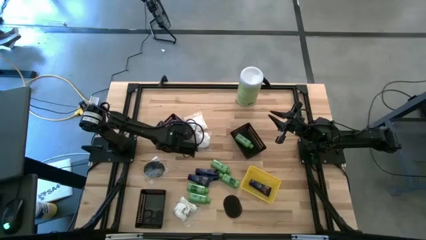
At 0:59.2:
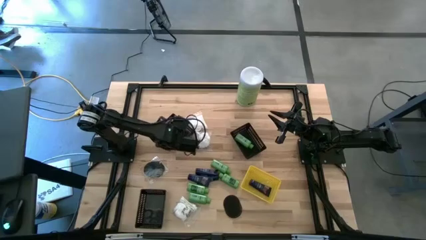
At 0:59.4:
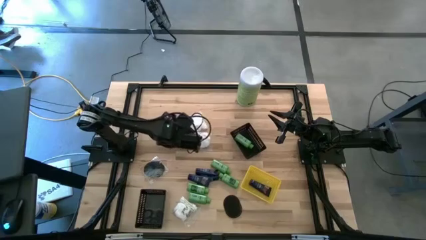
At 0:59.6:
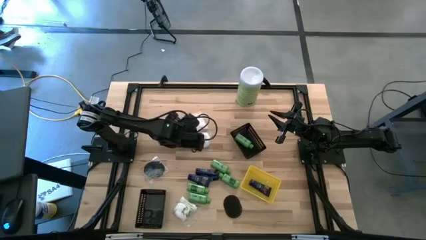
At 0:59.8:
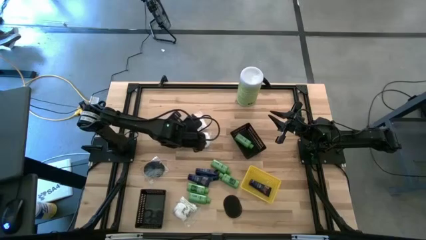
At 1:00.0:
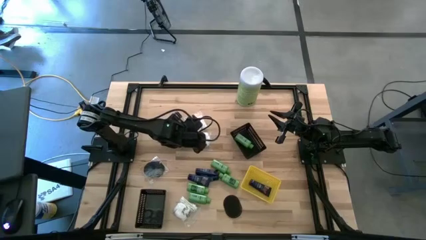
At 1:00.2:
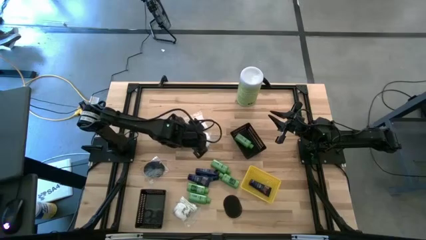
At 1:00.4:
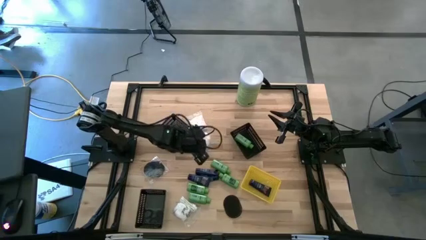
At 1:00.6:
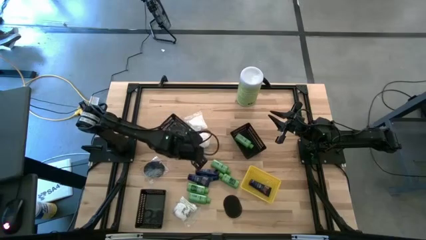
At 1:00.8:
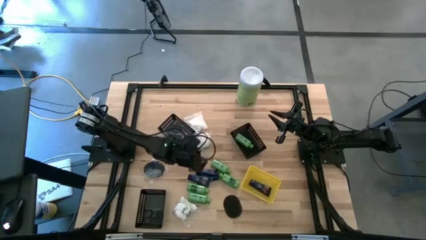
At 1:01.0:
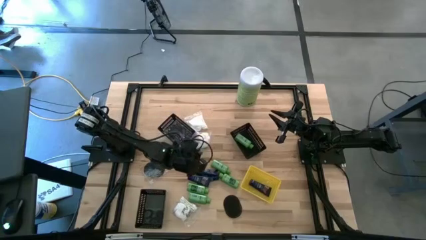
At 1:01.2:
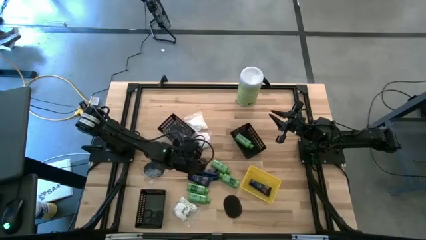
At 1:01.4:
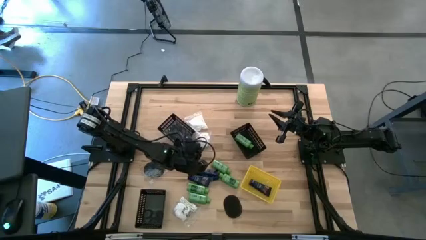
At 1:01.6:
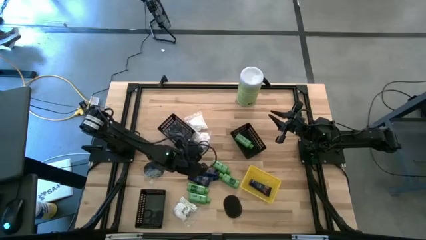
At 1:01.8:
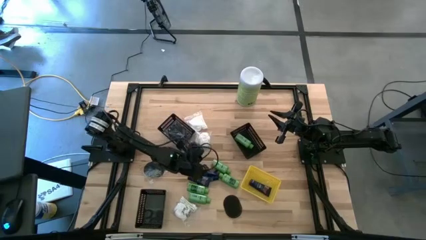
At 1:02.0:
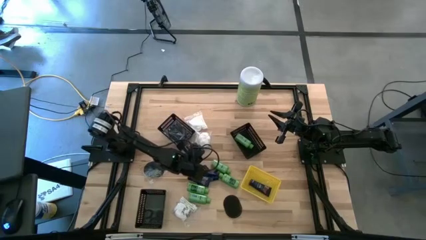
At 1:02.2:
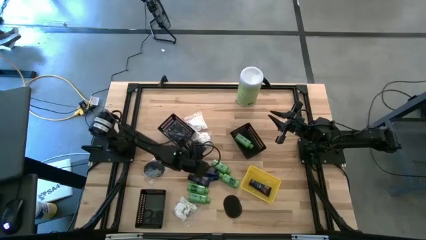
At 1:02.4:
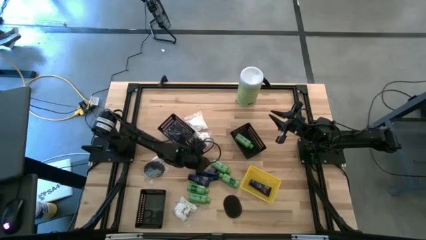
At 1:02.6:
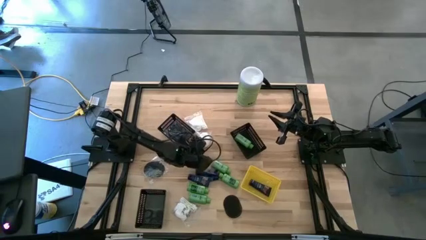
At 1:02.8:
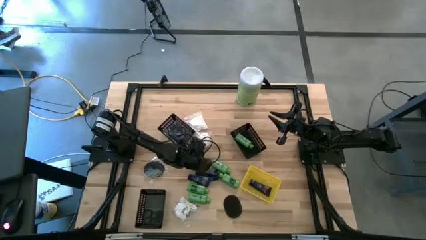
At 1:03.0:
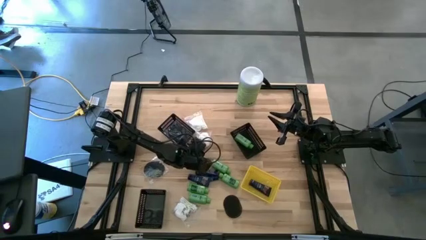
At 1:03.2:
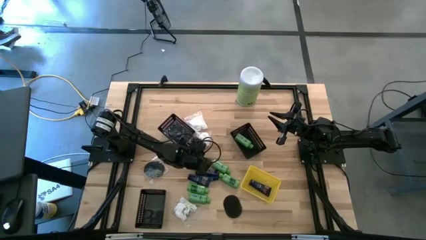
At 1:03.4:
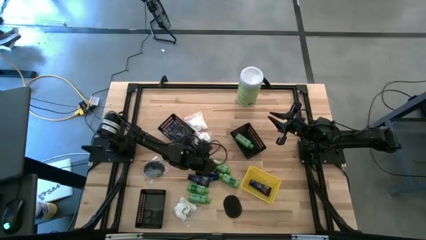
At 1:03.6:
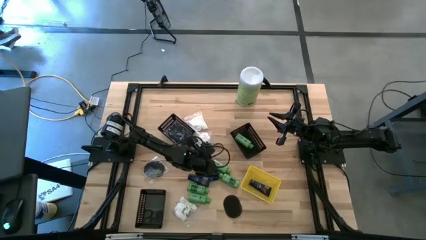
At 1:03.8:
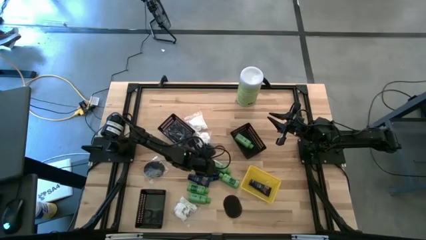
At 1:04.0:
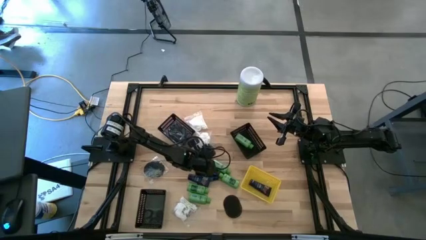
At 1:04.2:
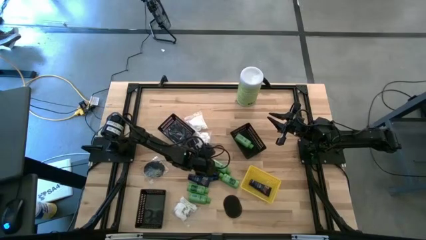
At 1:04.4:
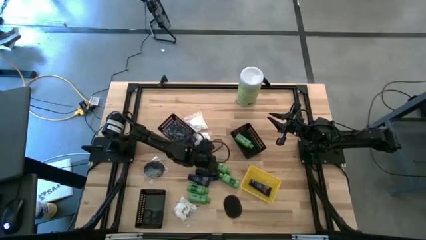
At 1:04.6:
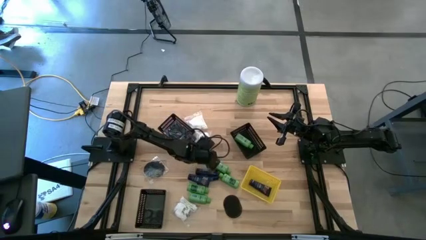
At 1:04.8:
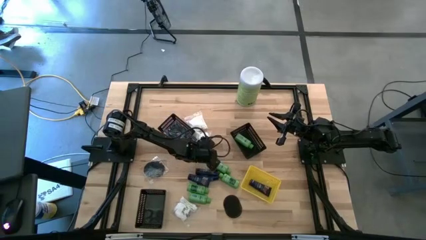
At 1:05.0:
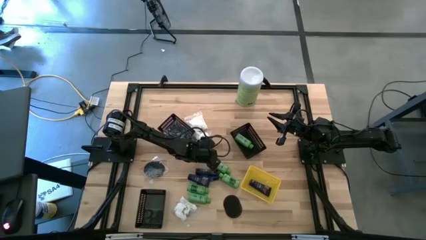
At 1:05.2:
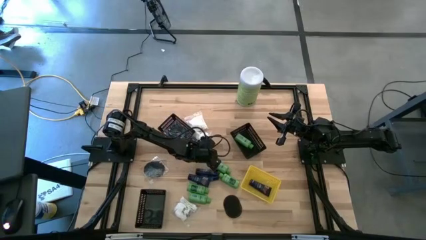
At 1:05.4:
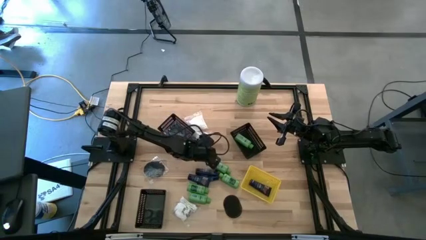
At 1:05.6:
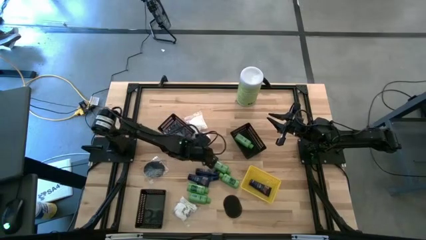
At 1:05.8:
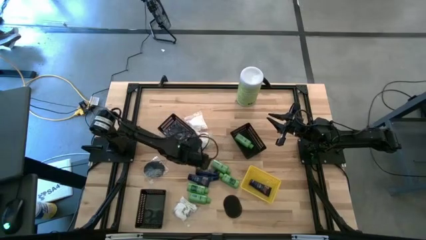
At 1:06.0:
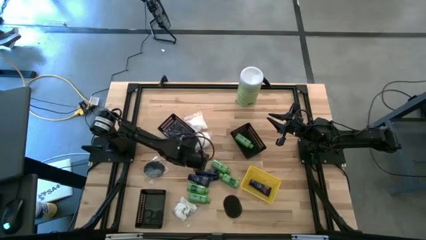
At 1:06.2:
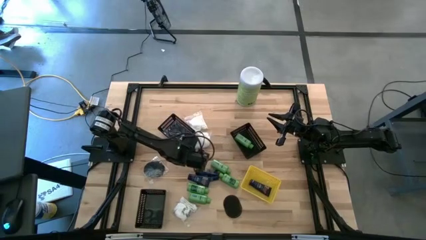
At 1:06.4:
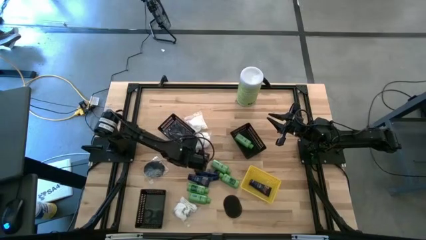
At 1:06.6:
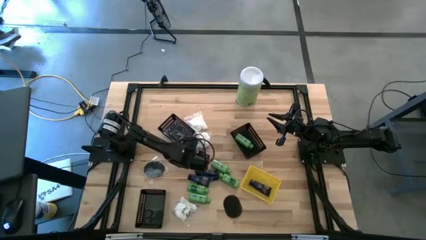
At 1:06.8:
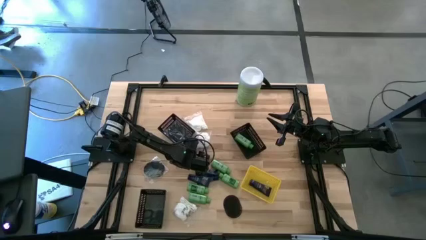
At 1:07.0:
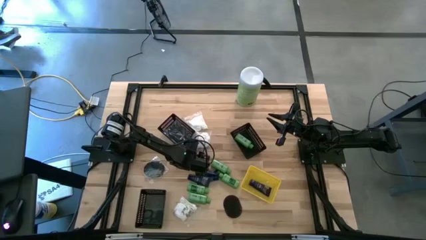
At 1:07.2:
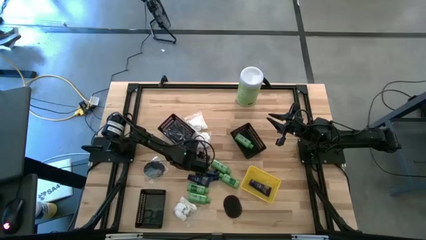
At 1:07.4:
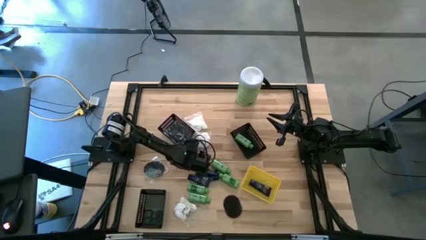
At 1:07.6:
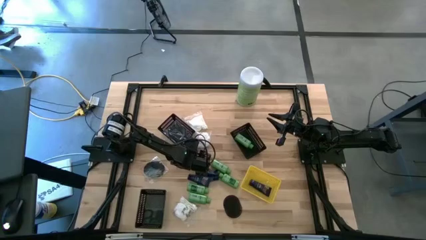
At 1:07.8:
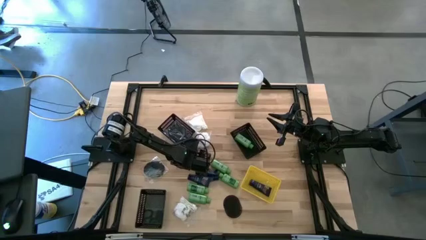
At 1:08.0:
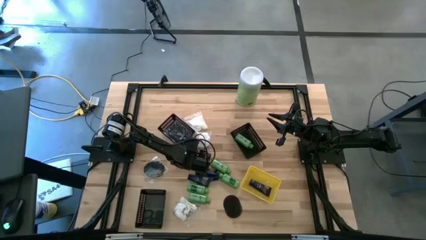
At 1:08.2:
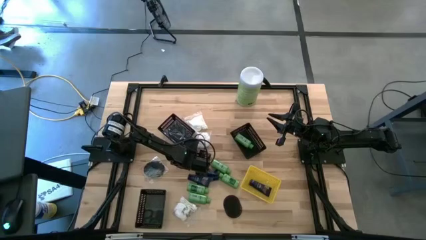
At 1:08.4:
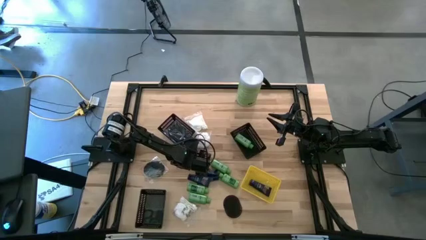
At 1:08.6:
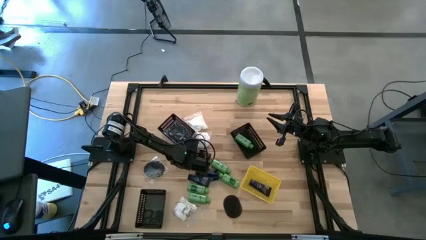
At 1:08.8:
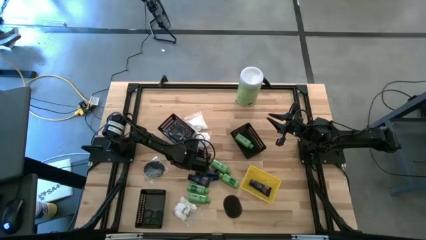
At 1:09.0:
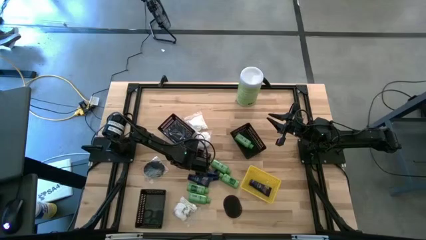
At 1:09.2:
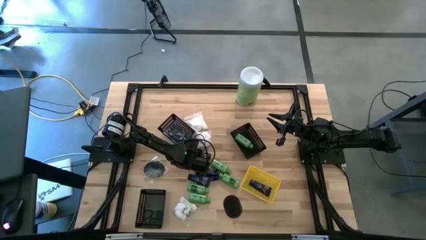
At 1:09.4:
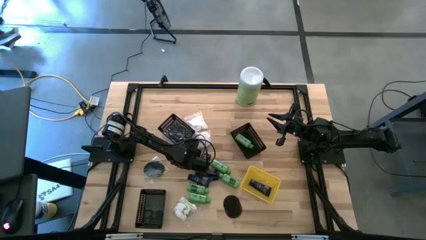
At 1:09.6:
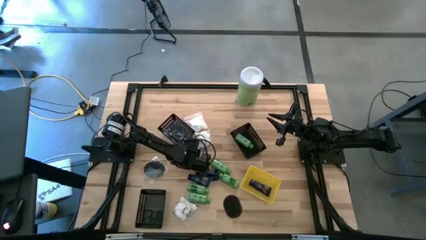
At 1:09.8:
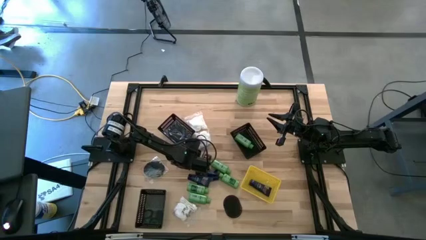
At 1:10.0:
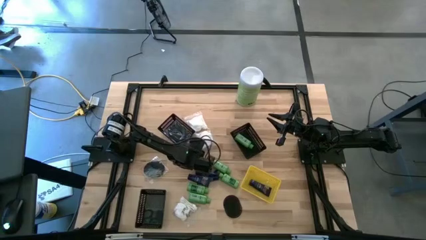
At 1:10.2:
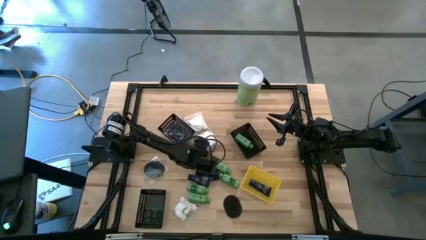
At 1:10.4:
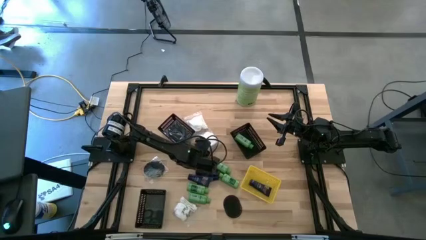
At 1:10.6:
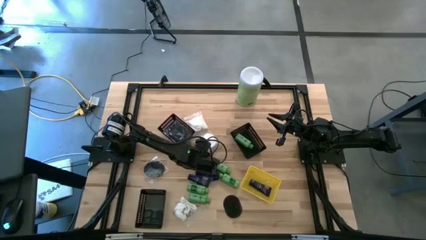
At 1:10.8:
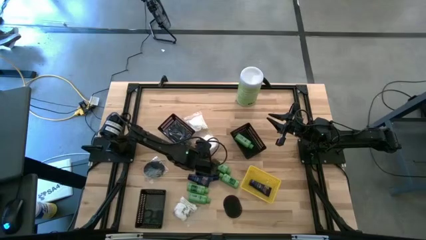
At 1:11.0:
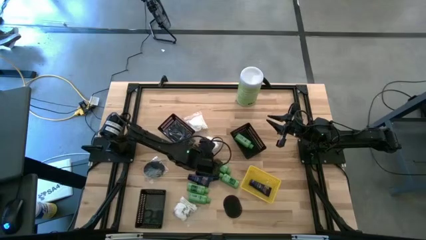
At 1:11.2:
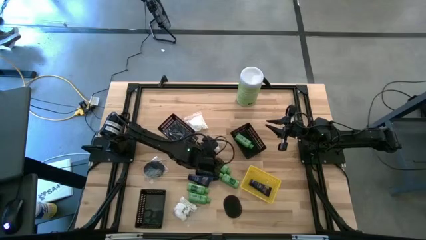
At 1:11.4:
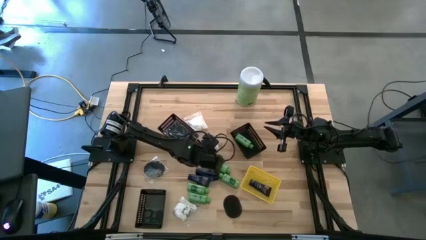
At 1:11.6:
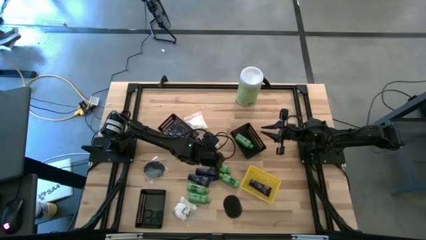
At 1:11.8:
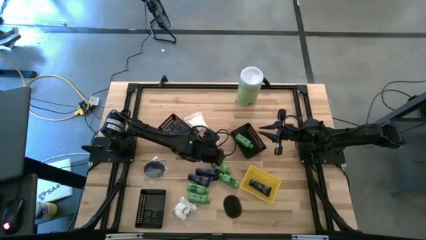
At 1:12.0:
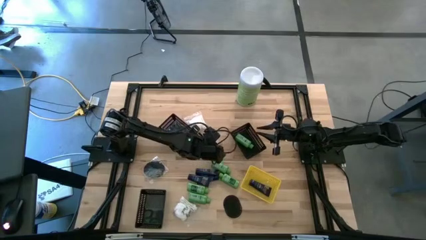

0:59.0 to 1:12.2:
Task: Pick & Place Travel size toiletries
Put the cotton pack into the bottom left black bin

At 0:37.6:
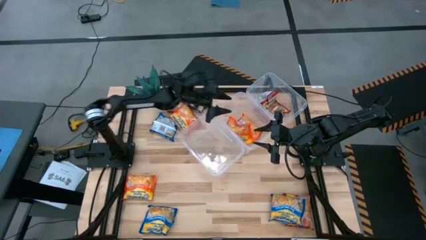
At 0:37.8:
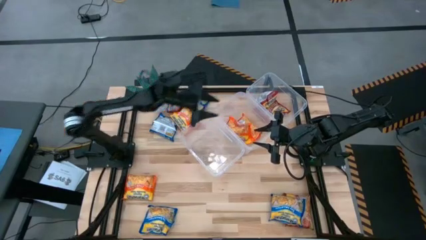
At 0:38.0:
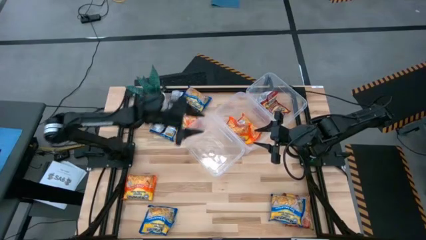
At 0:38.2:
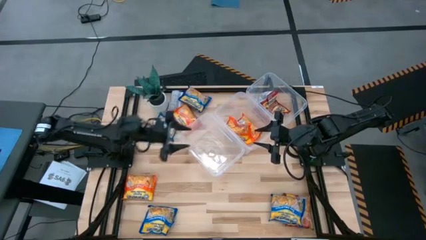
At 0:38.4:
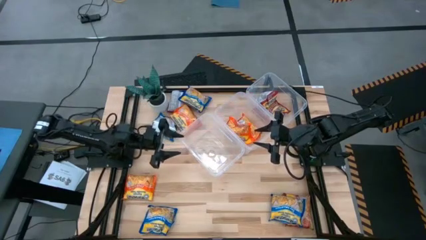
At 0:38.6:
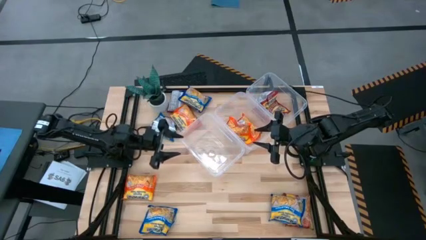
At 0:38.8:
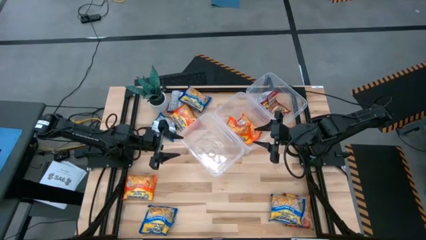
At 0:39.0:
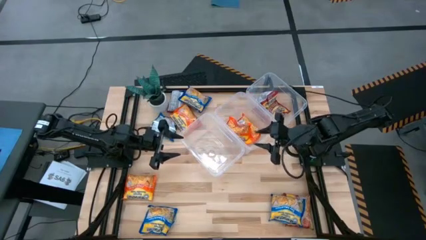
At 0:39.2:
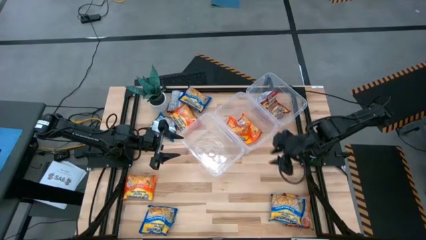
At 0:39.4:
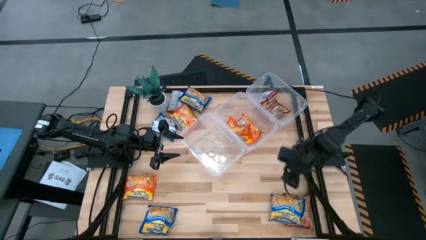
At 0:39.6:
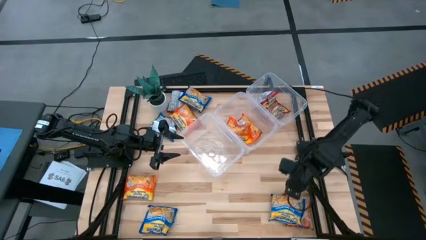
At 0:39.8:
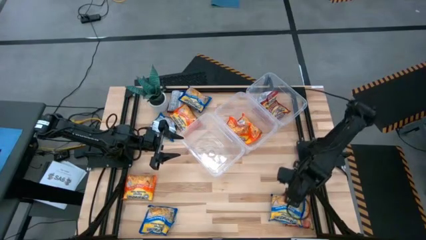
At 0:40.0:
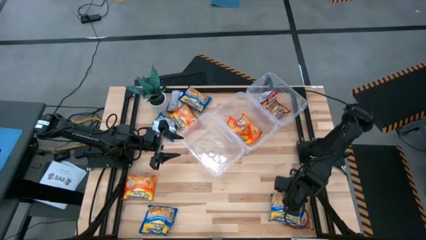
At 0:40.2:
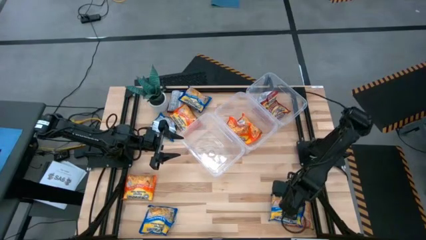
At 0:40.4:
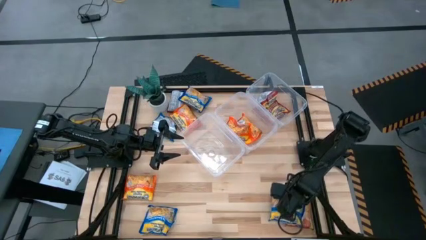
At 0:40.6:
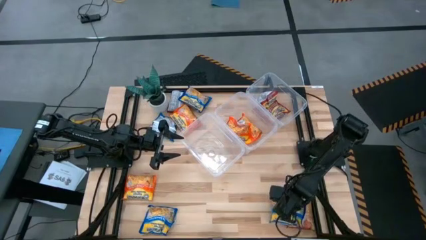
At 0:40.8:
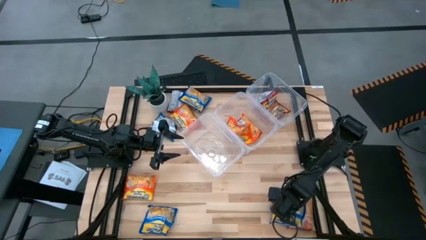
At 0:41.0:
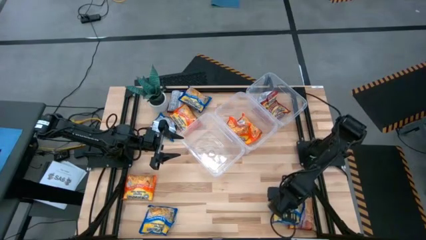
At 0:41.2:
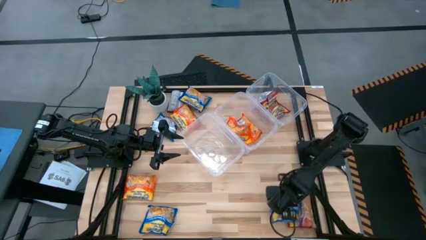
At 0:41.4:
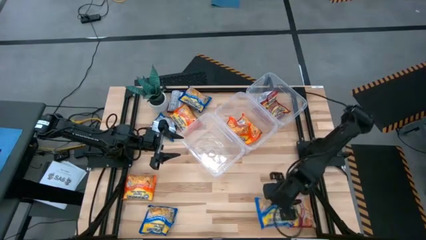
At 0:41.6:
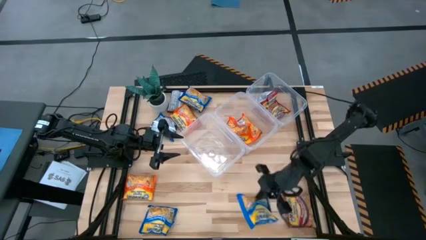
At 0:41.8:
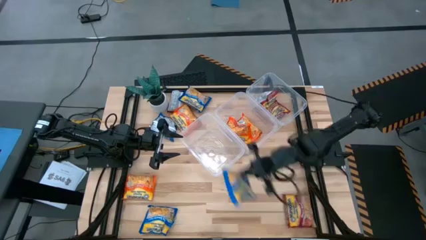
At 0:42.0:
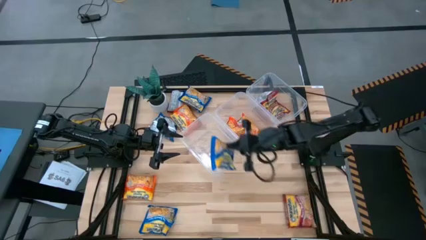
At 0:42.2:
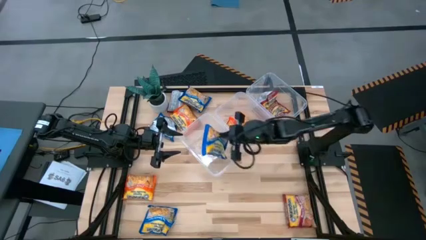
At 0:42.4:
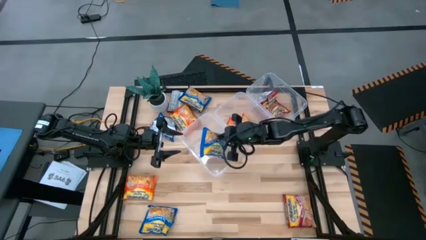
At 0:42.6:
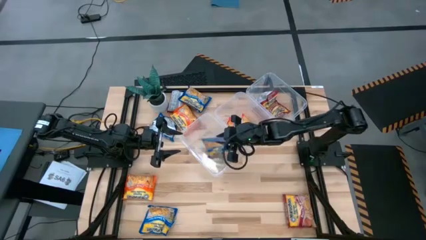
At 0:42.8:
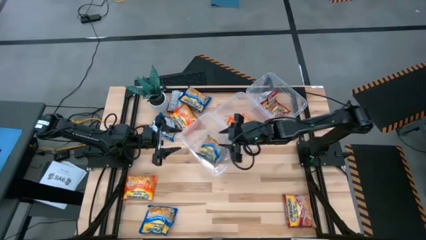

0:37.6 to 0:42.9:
Task: Sort Maruchan noodles
Put the blue noodle pack into the left transparent bin
